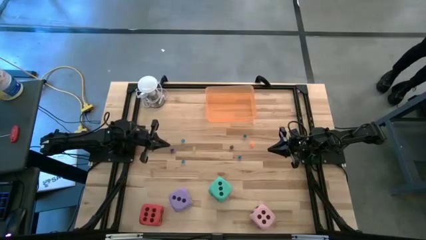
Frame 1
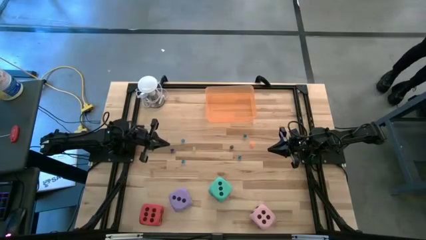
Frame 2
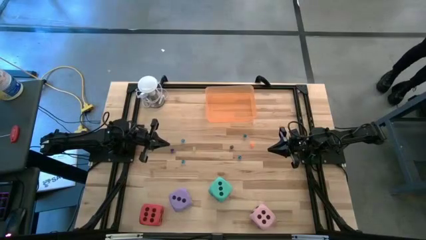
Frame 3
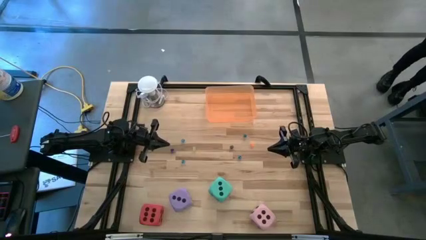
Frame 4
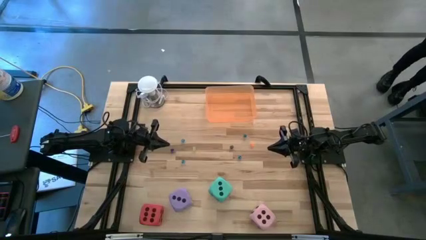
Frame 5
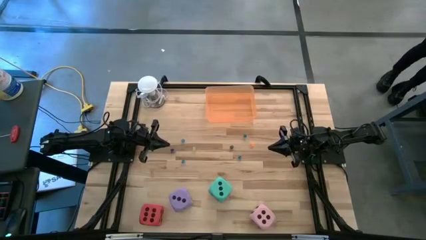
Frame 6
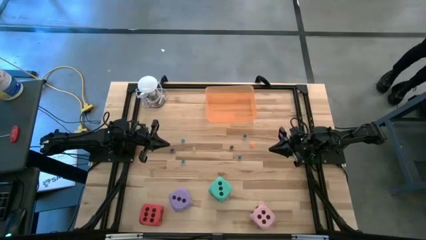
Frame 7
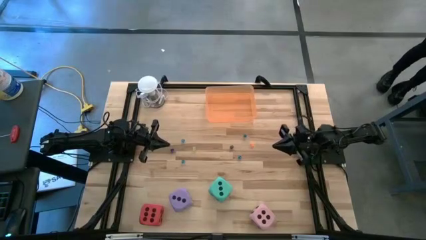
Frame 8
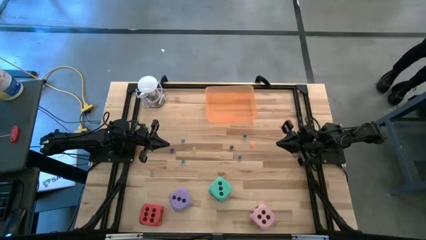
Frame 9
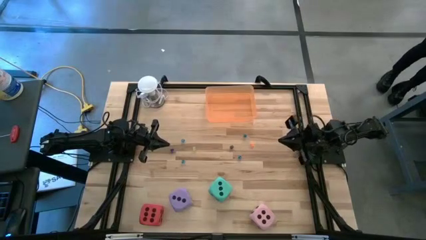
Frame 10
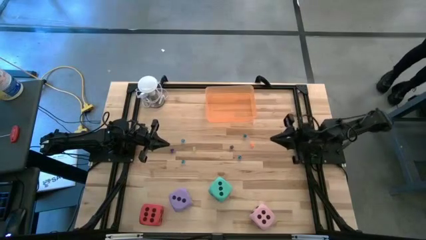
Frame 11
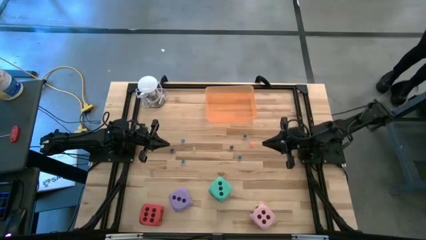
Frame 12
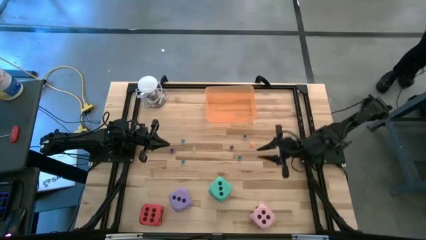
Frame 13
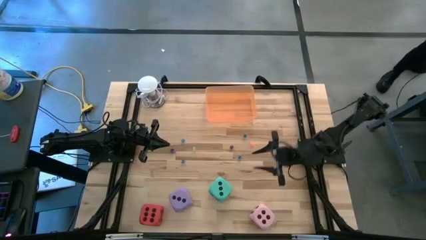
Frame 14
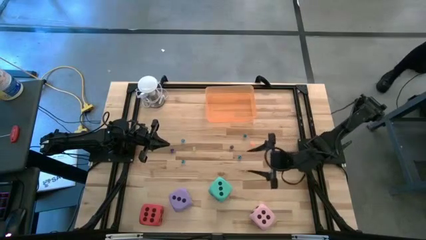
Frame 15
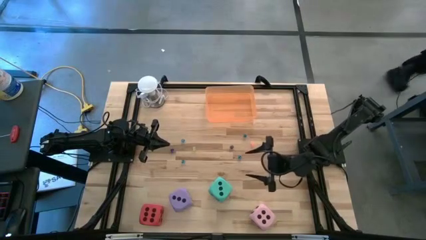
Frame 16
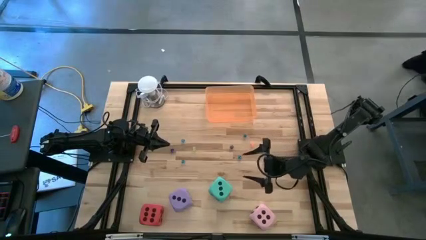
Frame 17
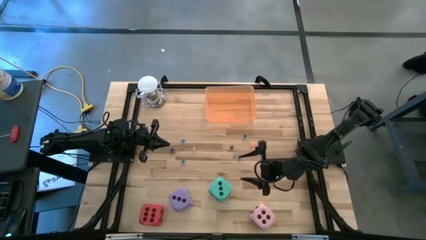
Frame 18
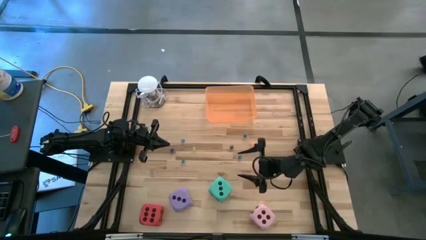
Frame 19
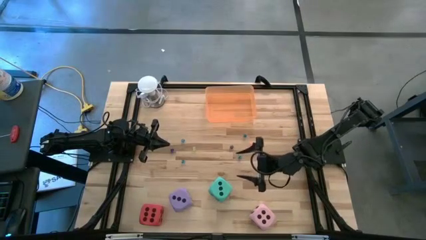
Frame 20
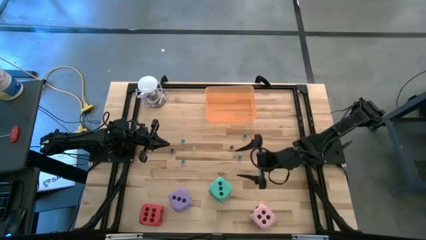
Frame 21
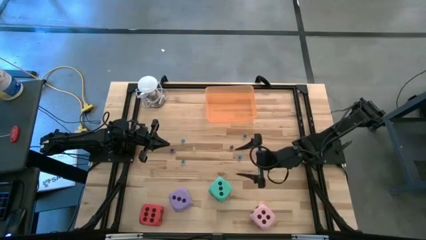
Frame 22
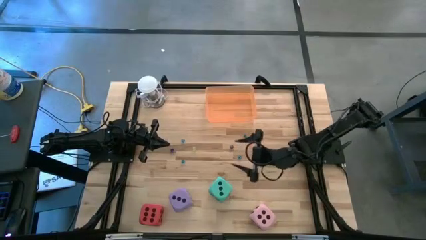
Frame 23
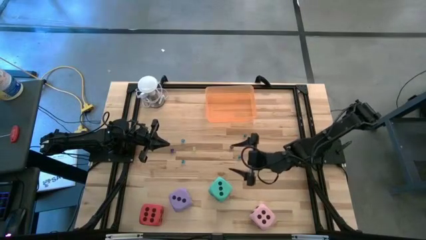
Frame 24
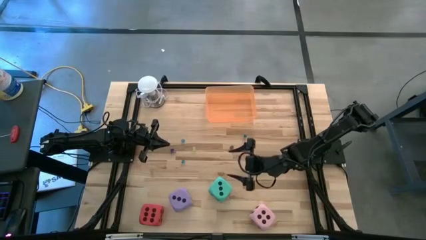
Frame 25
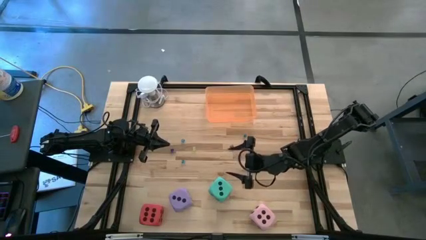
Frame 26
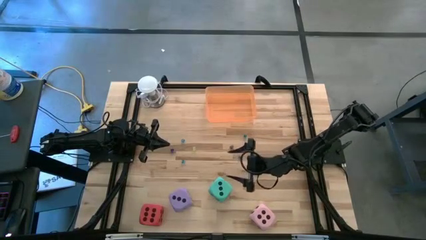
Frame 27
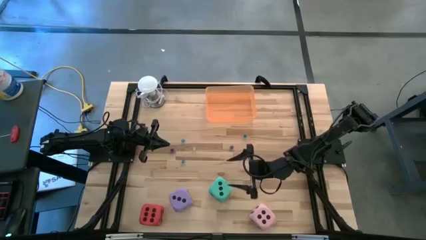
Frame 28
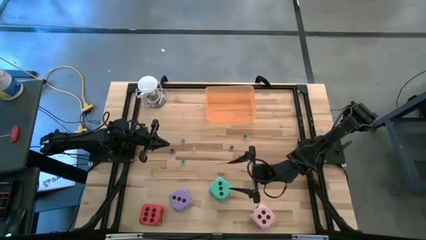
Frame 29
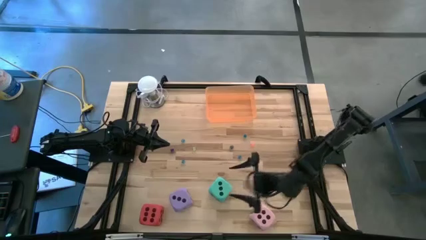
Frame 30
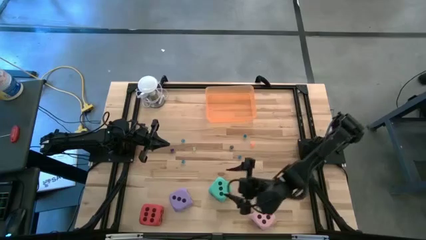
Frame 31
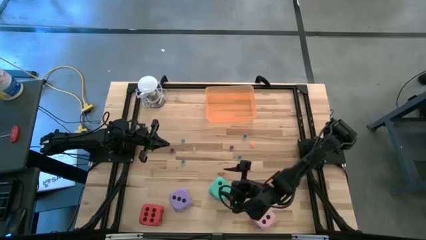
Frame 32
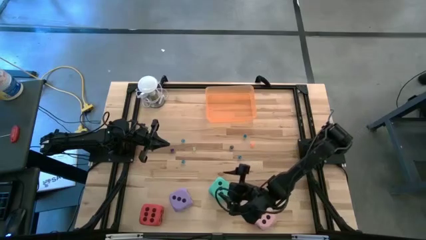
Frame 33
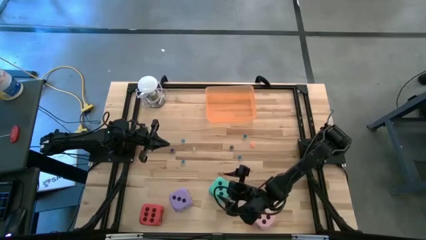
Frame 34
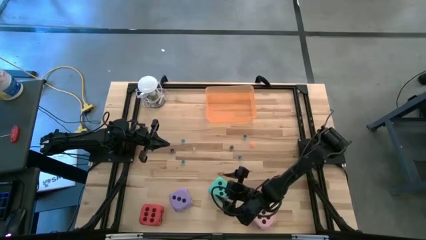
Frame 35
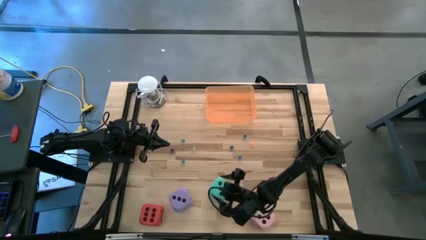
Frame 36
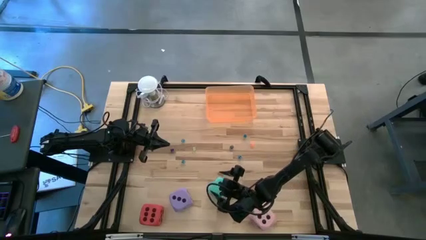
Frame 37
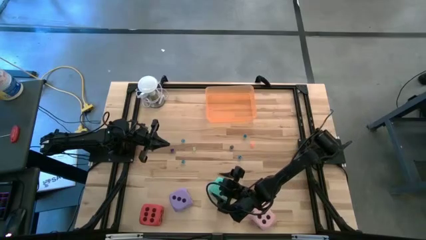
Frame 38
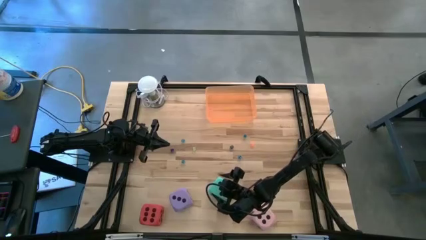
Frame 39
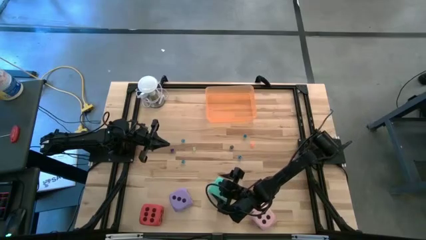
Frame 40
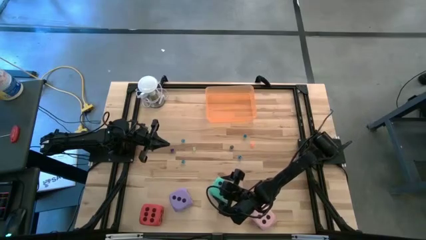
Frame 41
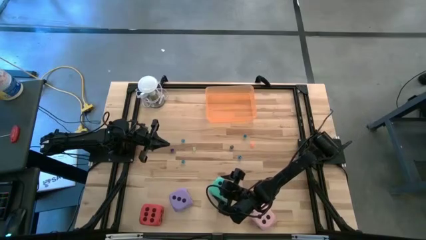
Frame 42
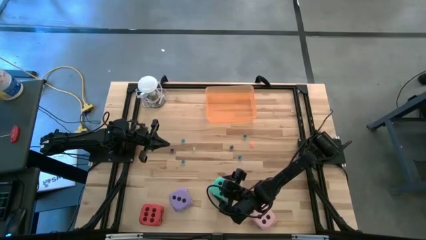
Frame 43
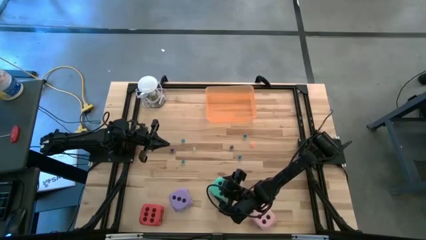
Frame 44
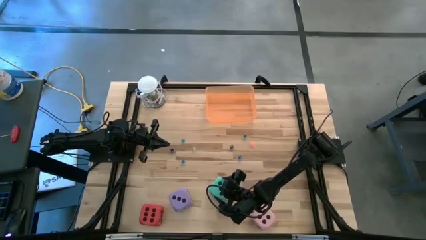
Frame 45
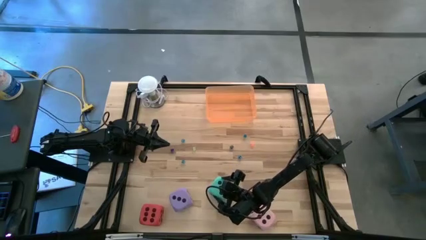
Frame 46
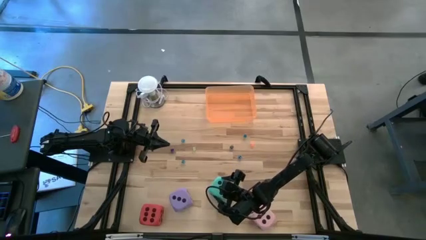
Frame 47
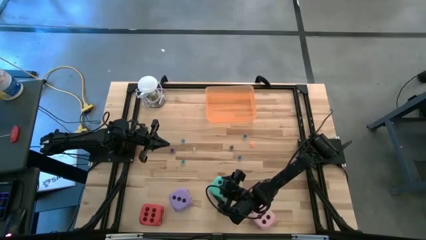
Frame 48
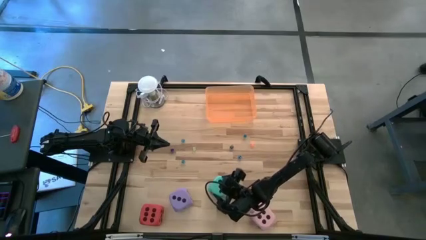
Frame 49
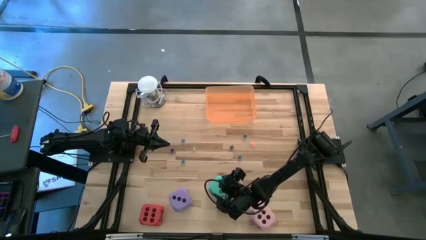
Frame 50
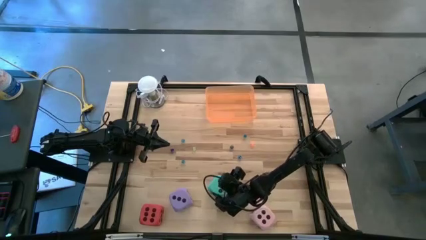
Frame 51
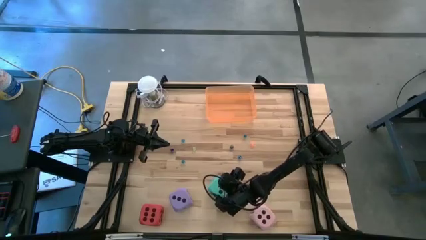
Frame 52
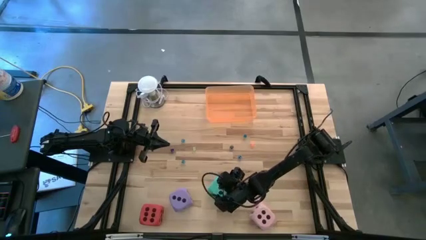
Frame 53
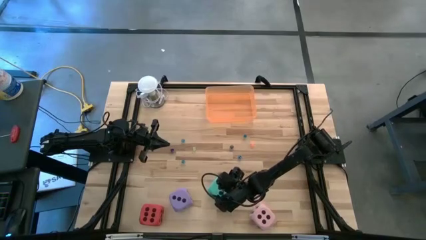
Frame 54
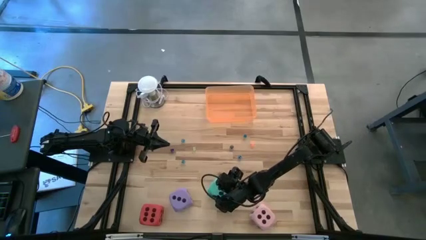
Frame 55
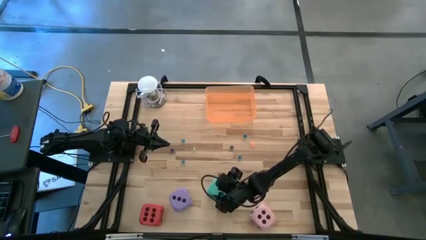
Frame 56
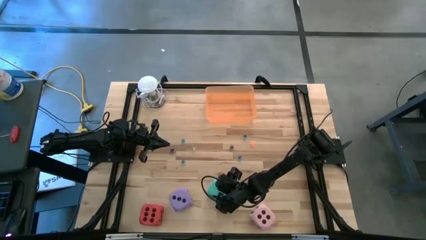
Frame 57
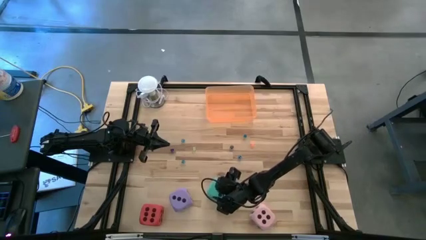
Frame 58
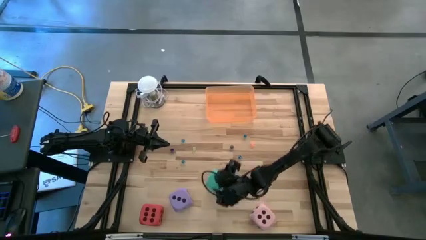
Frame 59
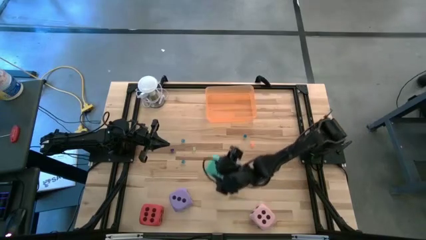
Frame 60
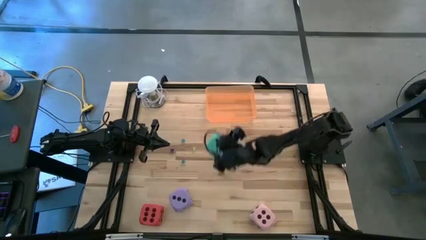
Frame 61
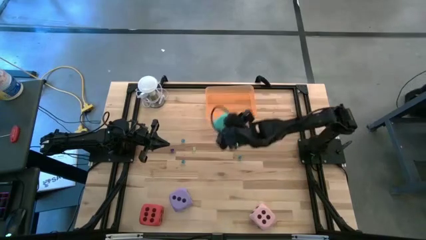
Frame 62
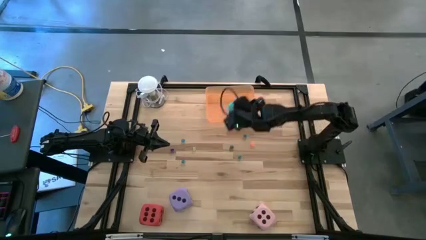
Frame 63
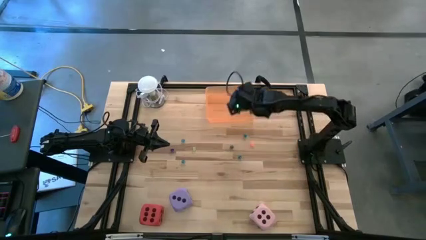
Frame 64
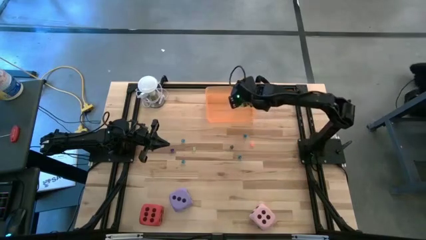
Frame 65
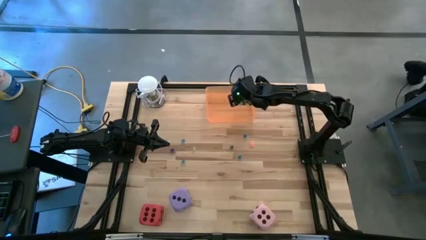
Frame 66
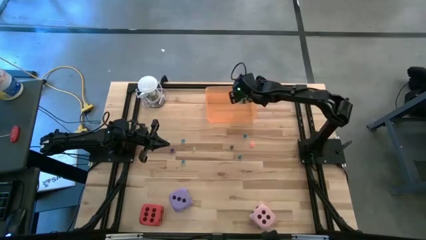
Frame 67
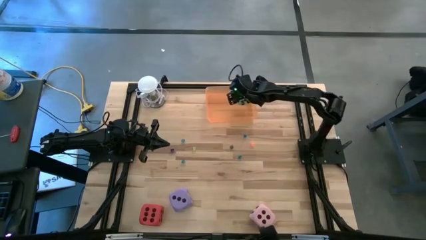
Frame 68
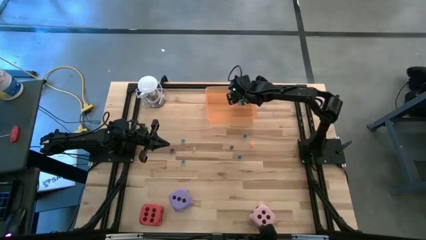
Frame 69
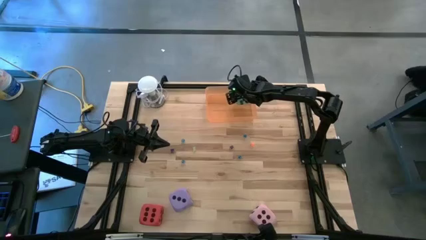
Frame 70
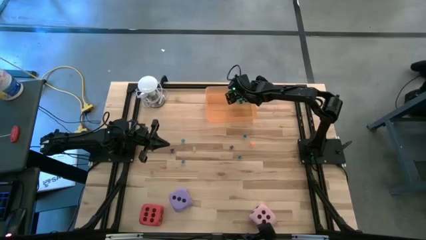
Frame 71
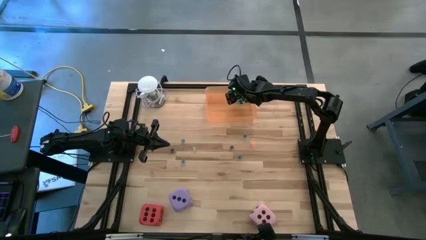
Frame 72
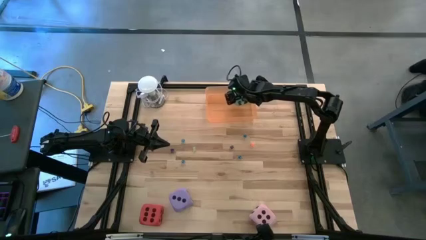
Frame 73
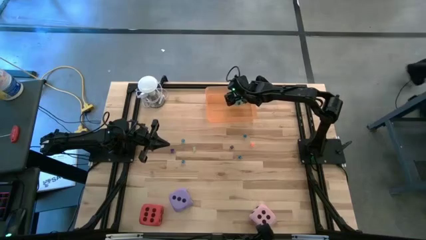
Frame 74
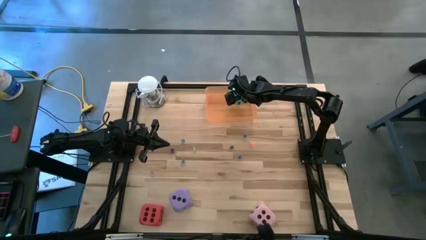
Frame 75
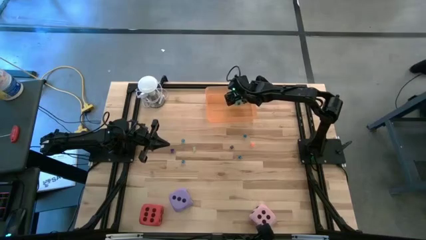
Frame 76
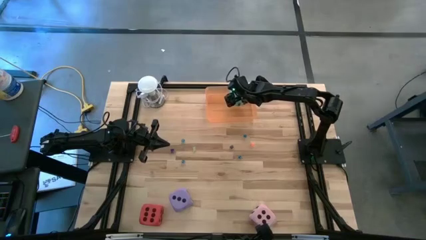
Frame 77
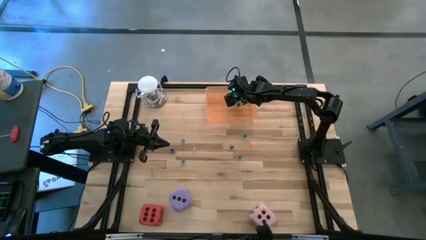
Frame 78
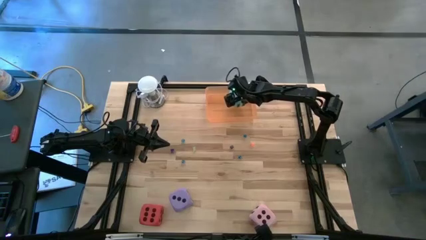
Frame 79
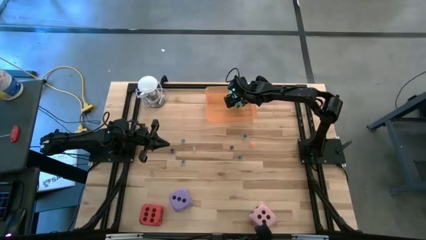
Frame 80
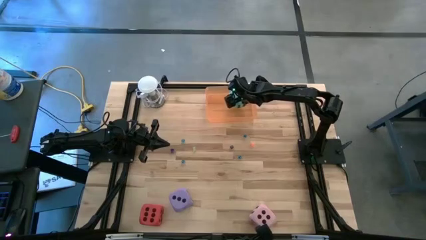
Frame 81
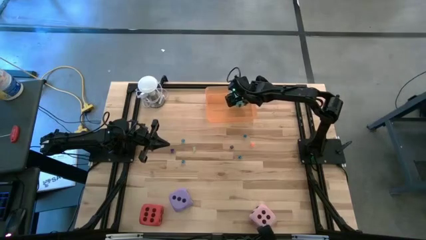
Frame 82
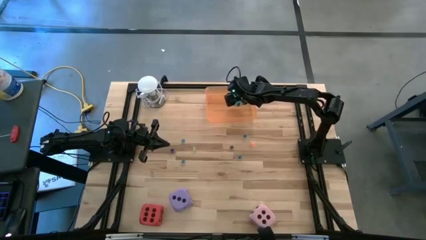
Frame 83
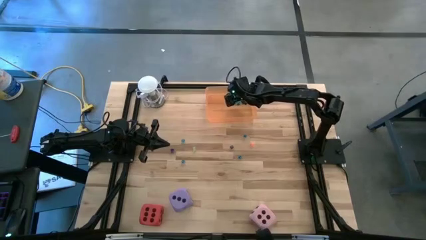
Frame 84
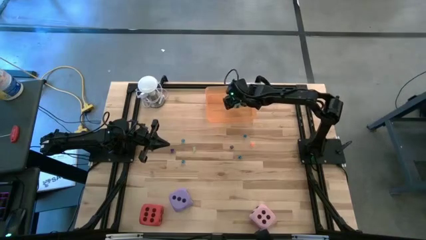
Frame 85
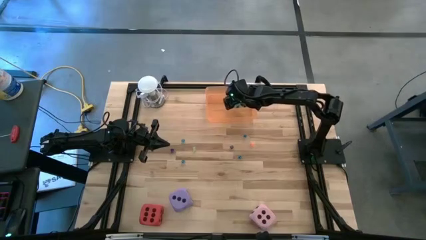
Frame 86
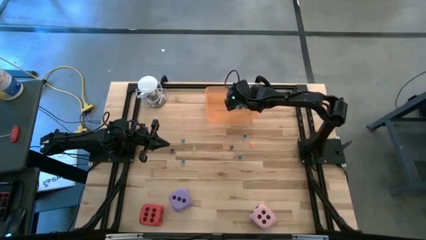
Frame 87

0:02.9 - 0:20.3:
Task: Pick & Place Dice
Put the big green die into the orange bin
